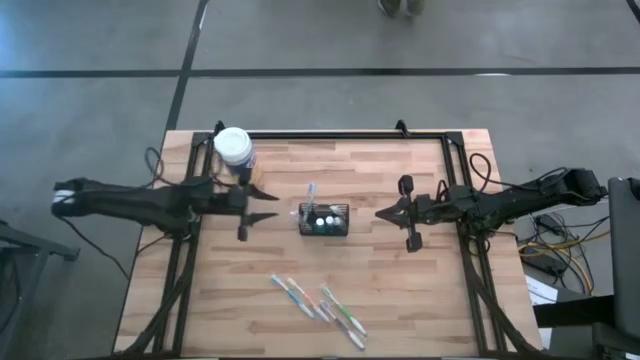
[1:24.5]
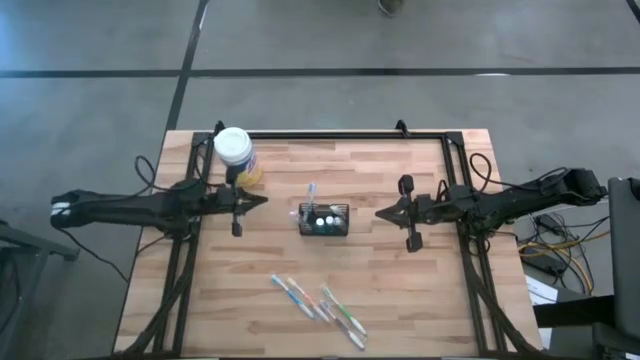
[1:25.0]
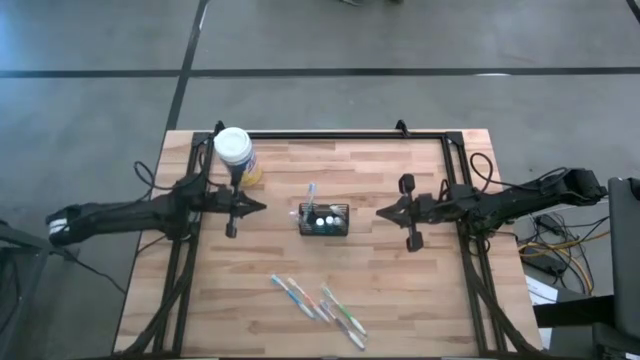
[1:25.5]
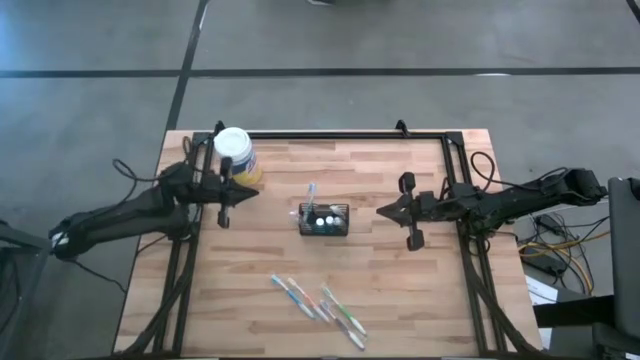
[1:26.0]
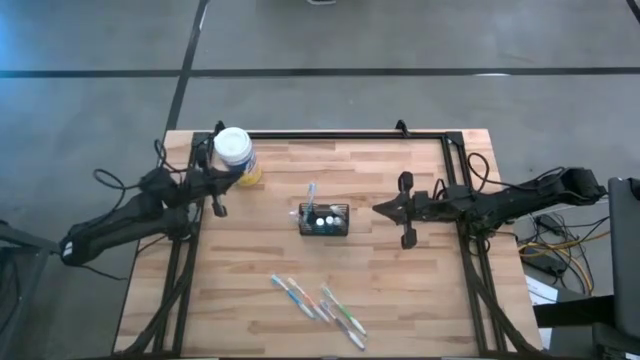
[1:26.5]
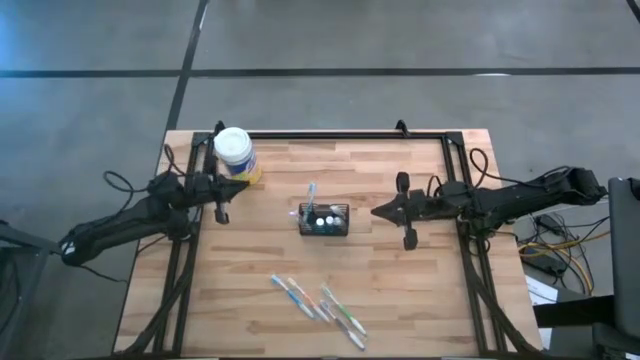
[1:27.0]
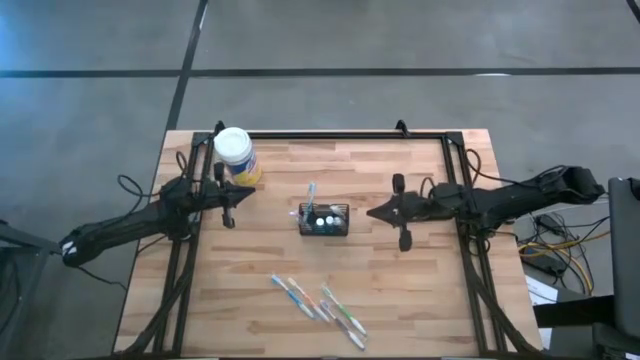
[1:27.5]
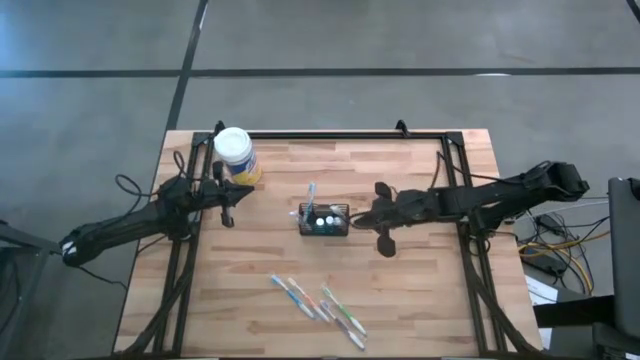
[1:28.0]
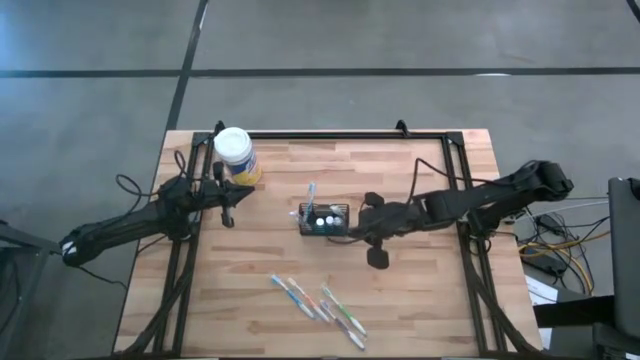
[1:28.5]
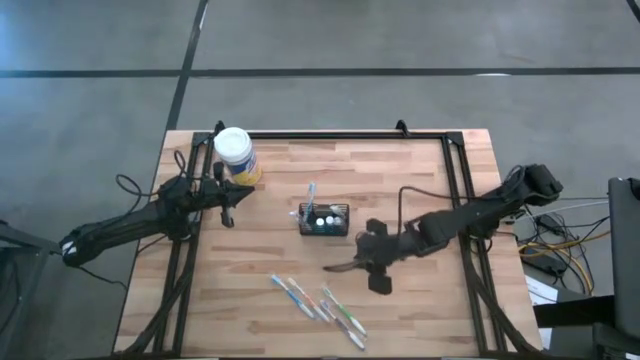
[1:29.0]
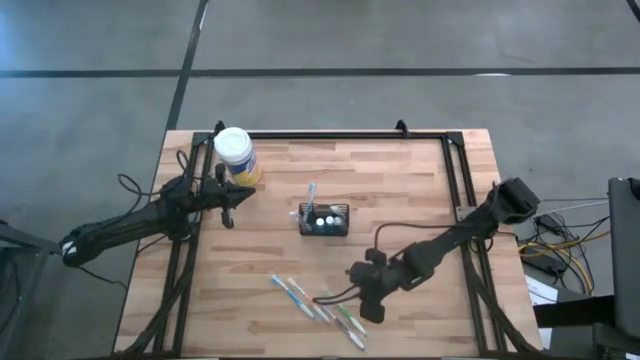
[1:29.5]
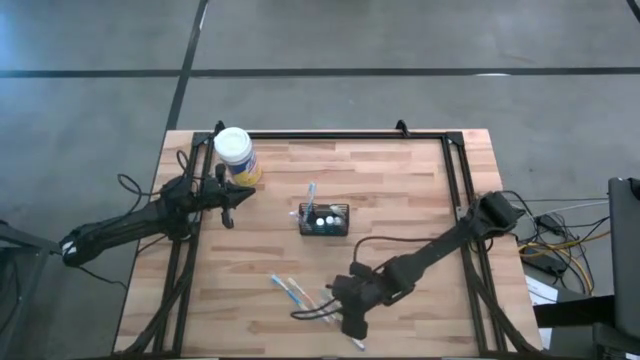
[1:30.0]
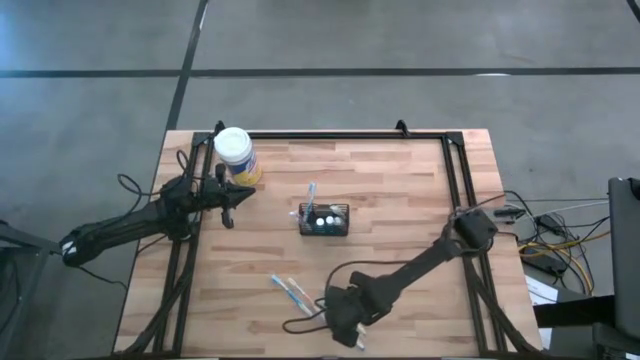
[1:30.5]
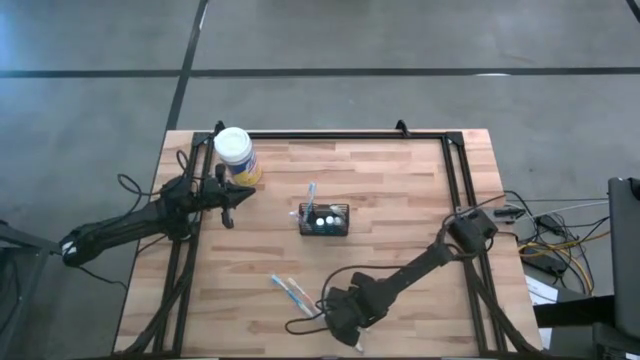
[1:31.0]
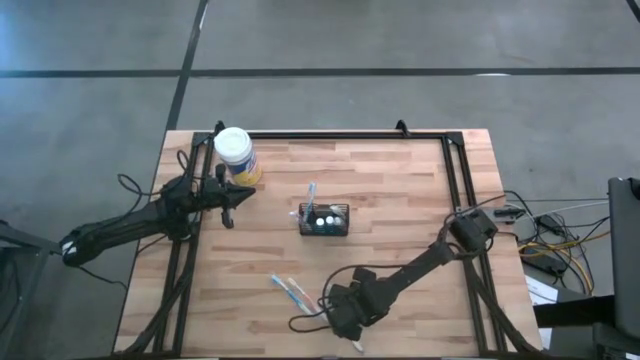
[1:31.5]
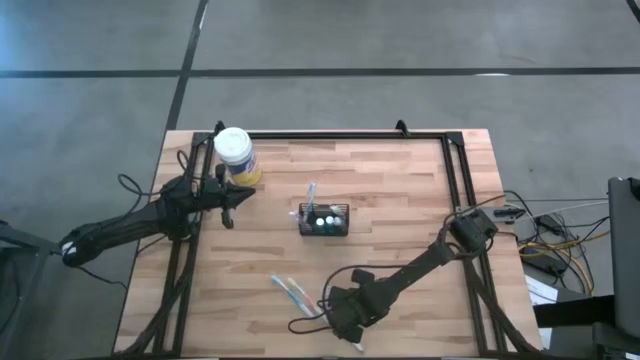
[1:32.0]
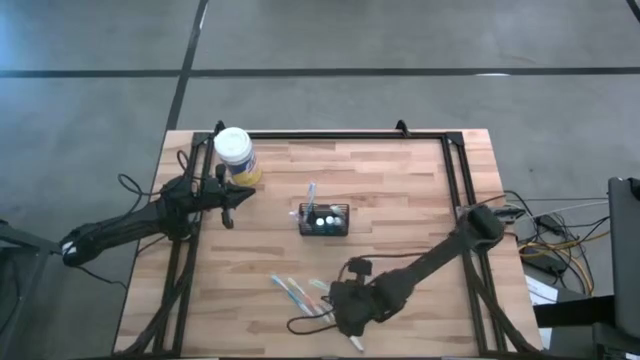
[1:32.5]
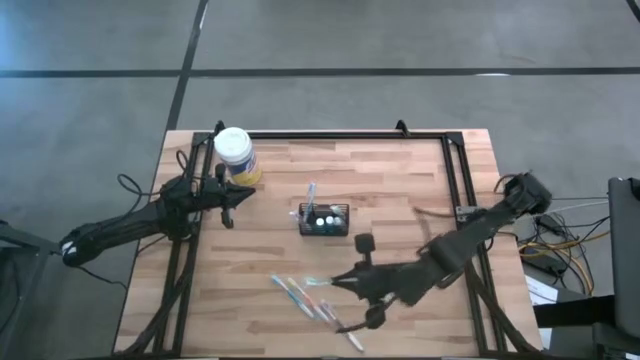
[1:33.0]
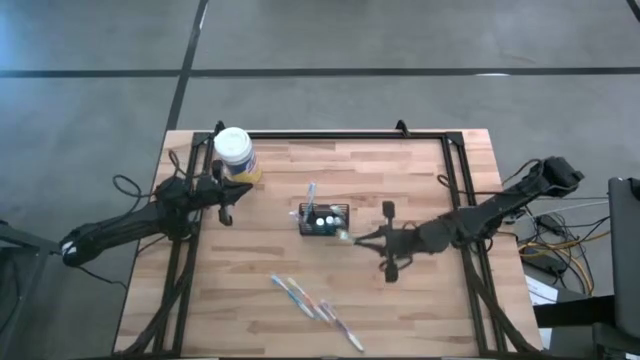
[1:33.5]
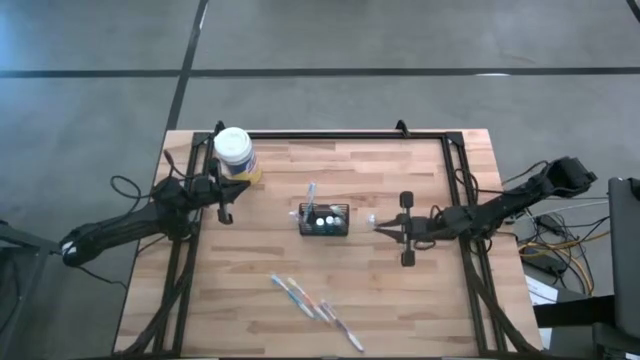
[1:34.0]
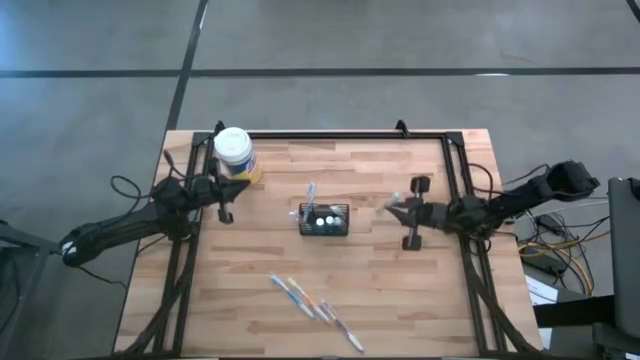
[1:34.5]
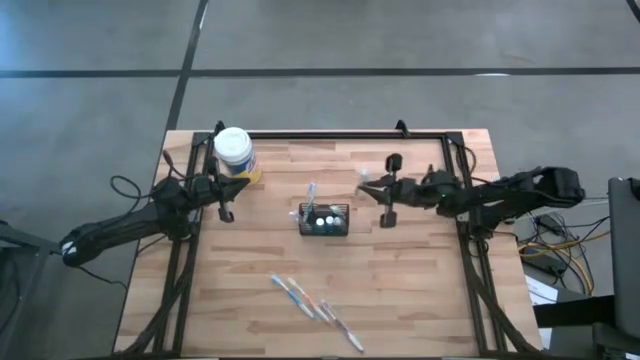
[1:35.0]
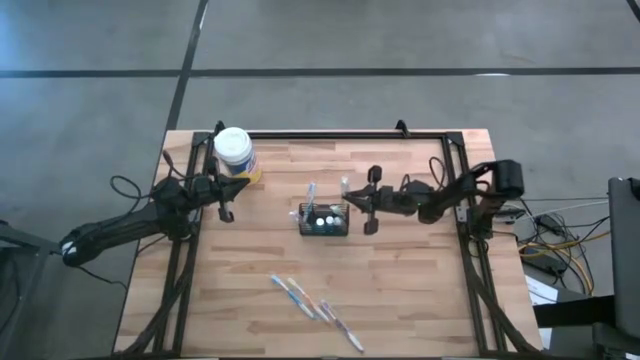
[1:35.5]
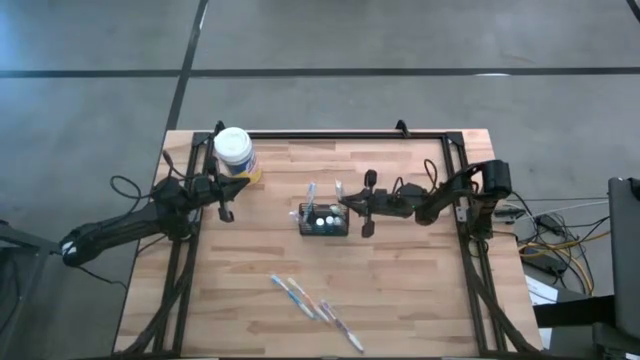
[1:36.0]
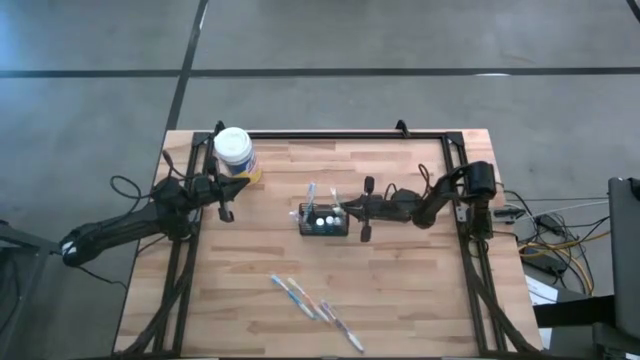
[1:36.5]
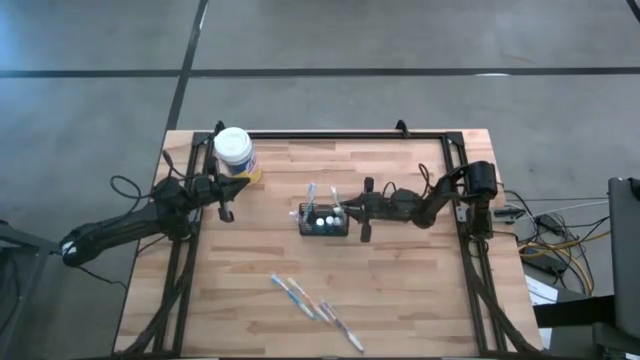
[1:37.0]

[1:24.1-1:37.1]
Task: Pick & Place toothbrushing station
Put the green toothbrush into the wire organizer

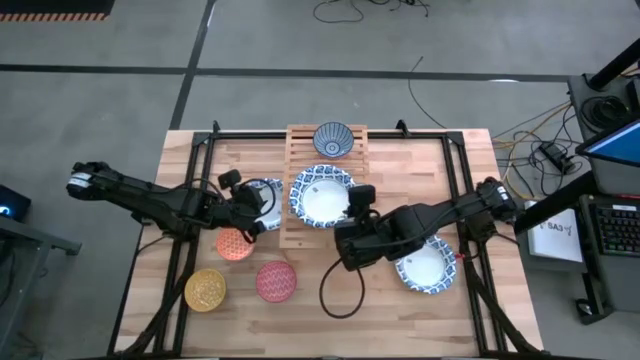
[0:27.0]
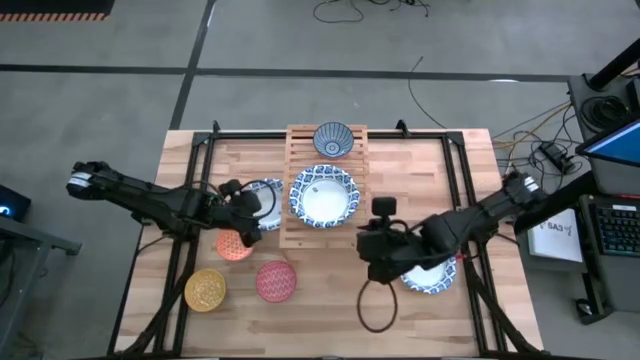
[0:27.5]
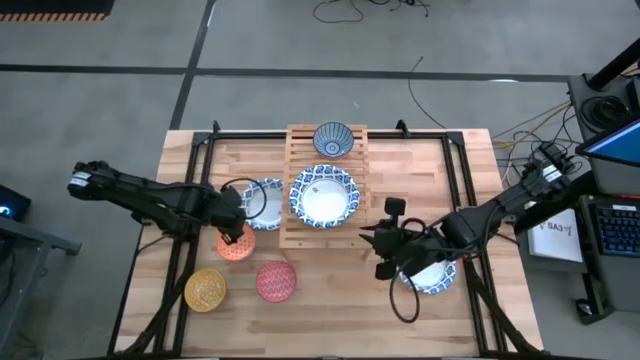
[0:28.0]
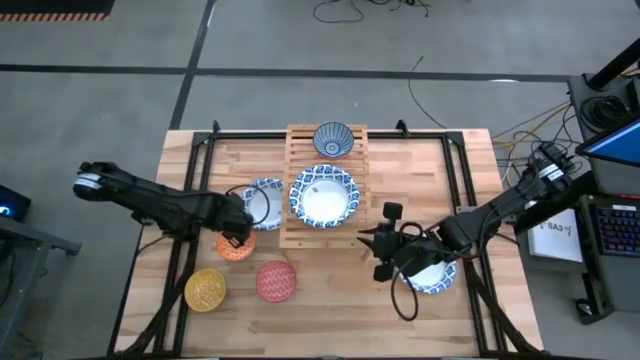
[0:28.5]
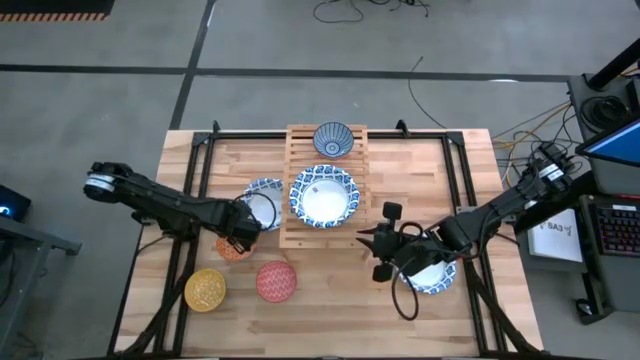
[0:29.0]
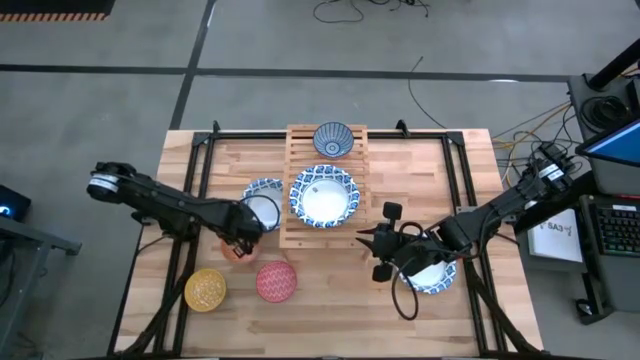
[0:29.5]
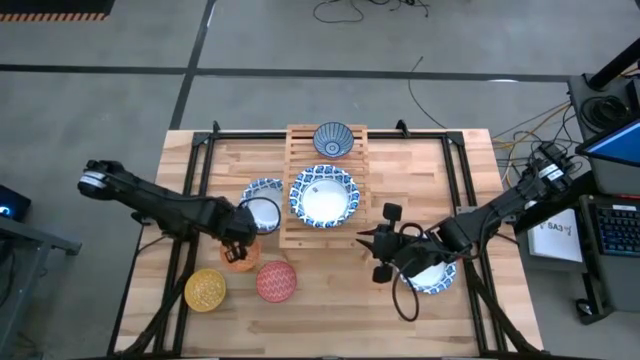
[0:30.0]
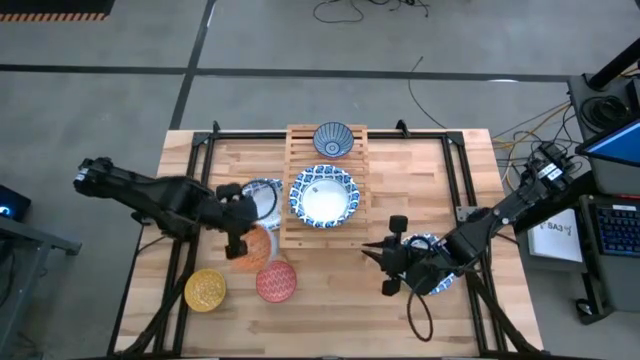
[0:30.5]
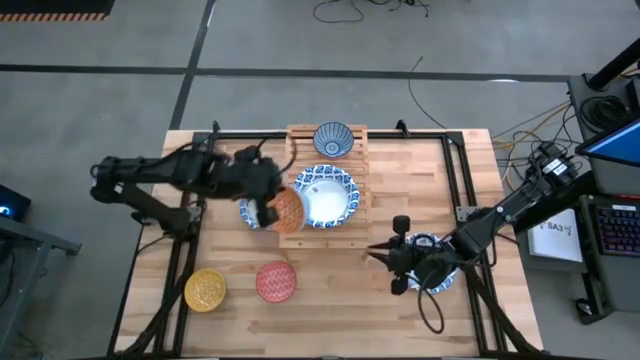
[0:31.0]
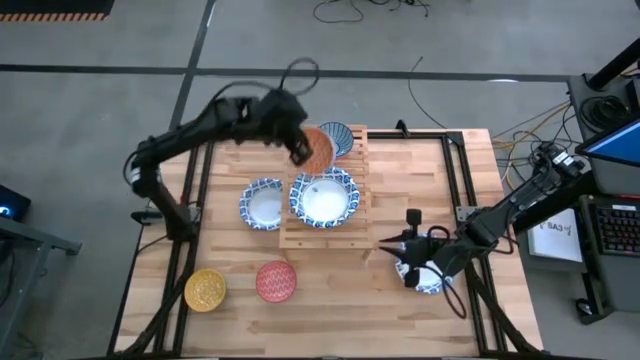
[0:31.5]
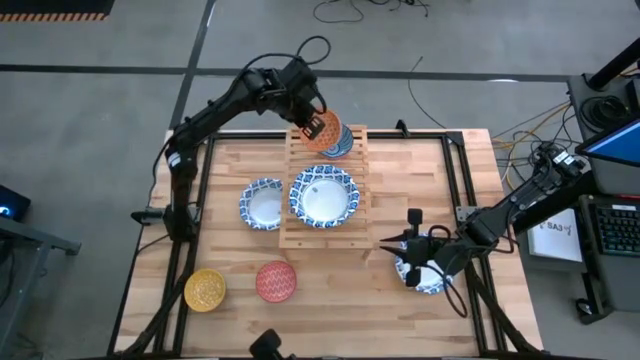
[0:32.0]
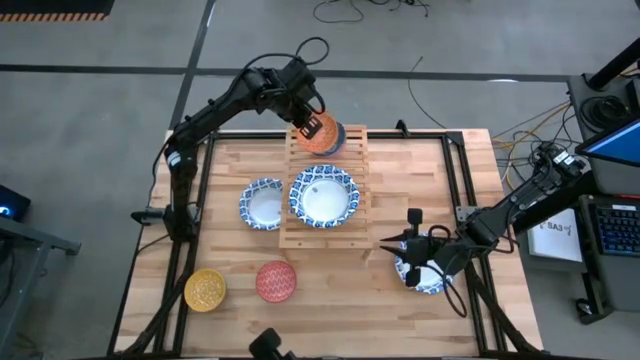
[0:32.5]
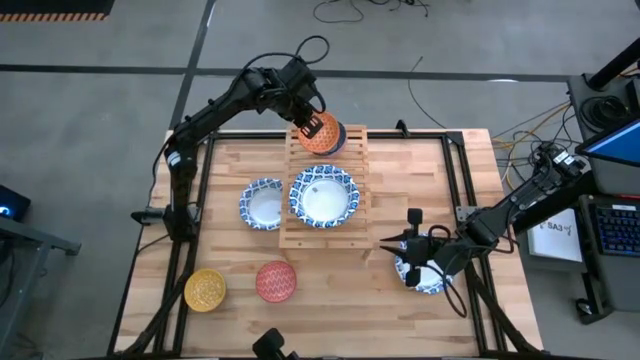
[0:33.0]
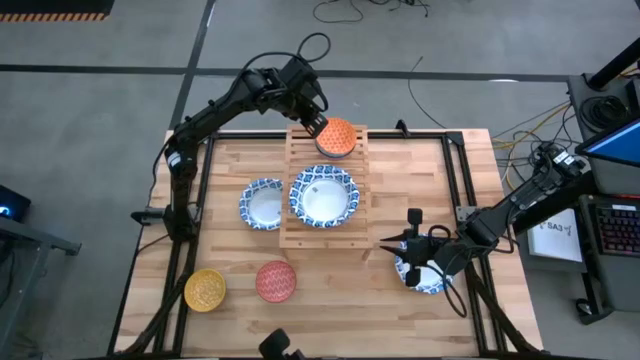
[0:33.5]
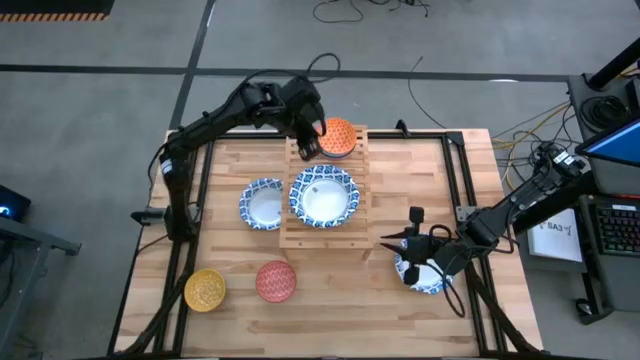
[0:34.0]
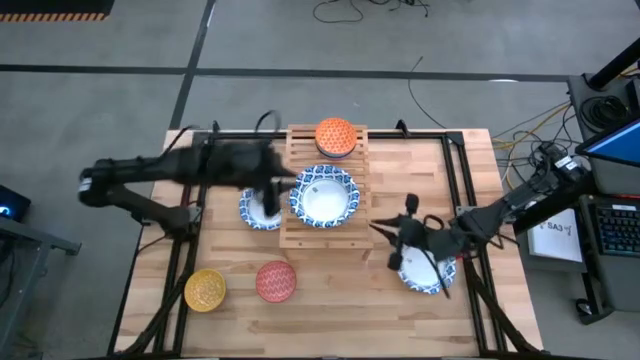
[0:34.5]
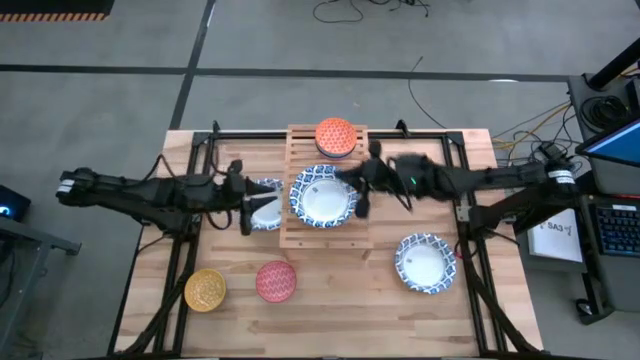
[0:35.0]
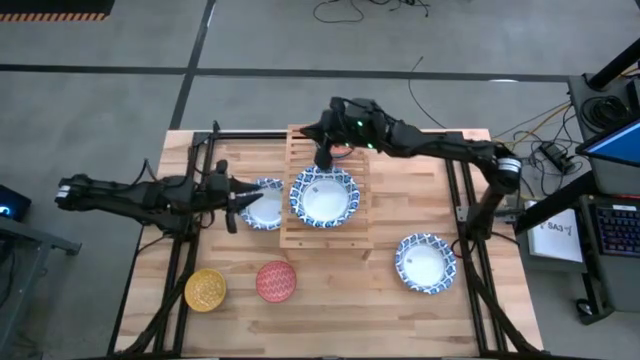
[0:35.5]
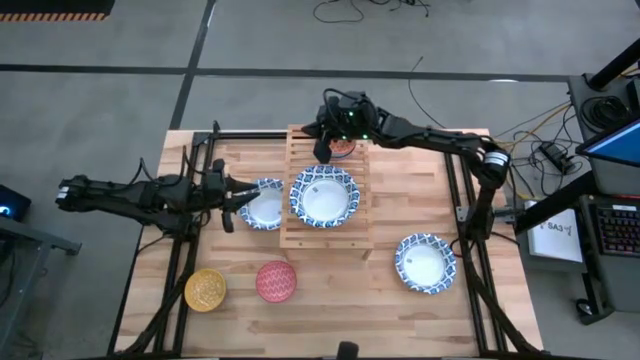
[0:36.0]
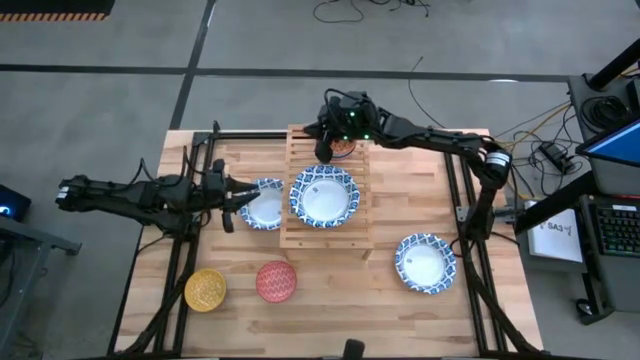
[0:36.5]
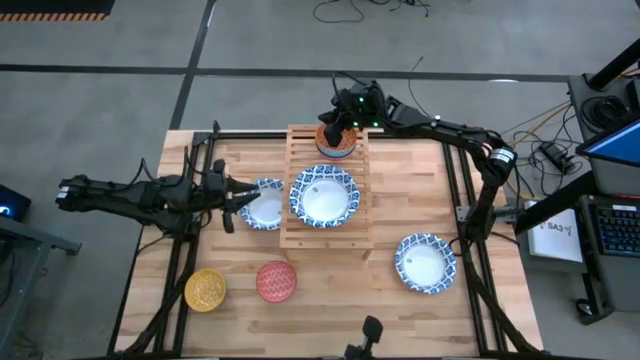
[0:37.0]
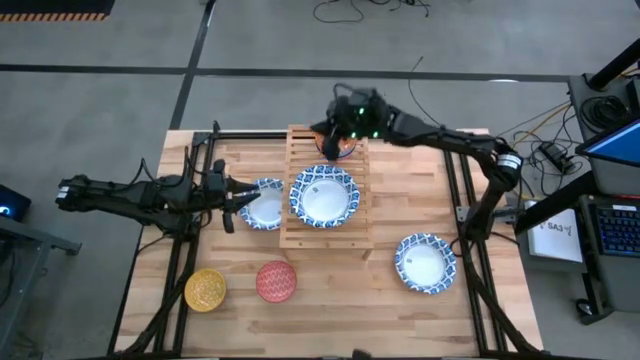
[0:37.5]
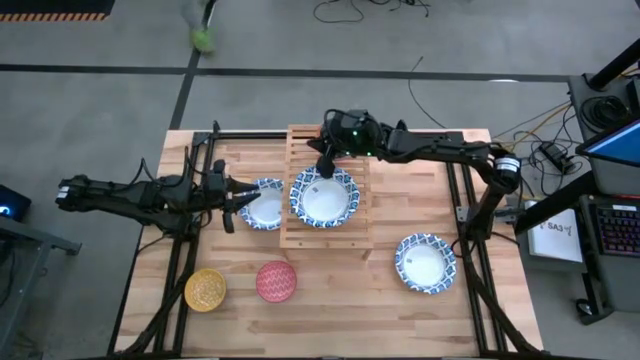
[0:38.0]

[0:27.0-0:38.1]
Task: Place and stack bowls onto a shelf
Stack the orange bowl on top of the blue bowl on the shelf
